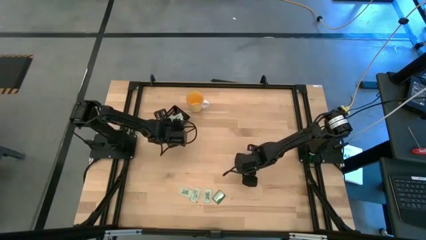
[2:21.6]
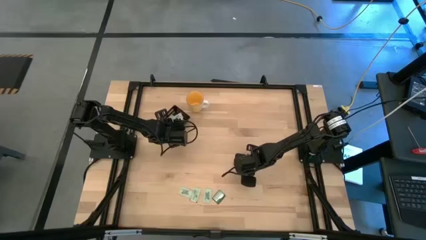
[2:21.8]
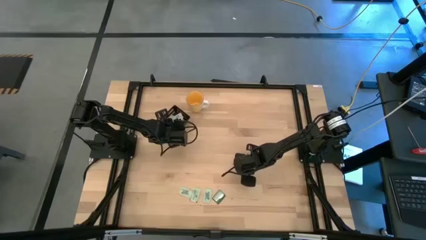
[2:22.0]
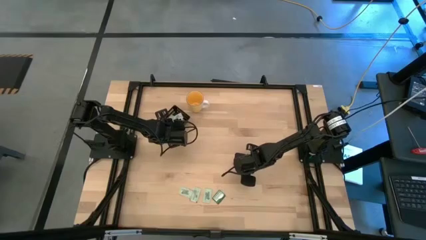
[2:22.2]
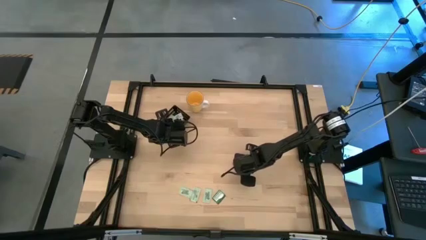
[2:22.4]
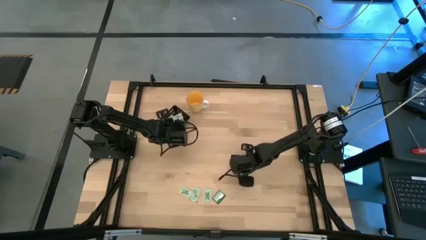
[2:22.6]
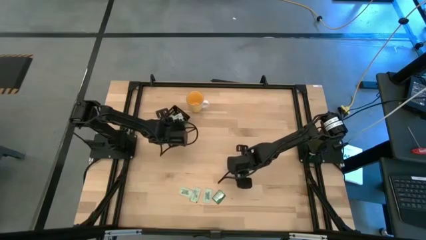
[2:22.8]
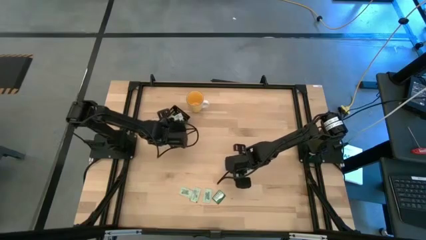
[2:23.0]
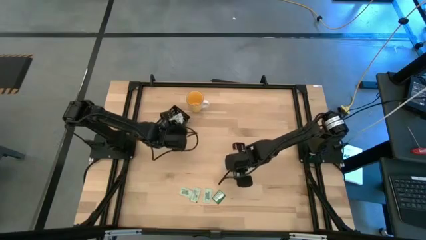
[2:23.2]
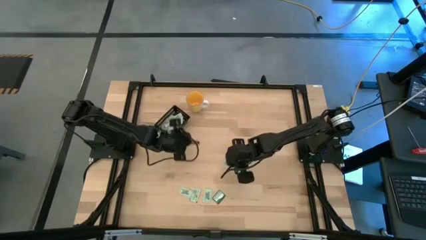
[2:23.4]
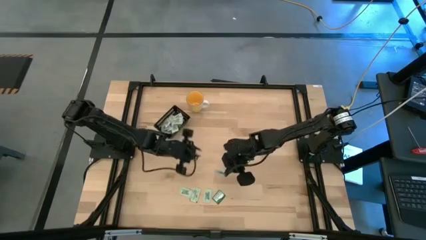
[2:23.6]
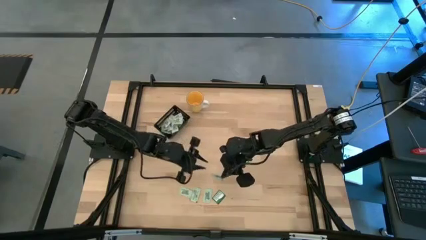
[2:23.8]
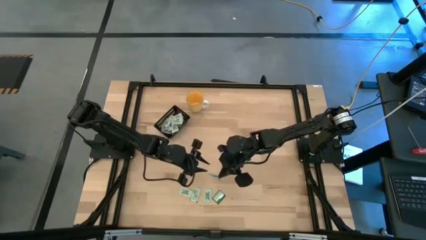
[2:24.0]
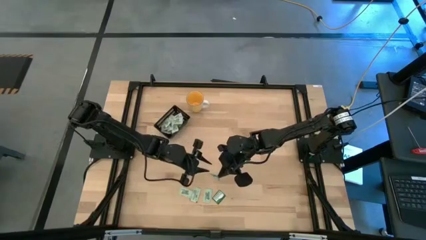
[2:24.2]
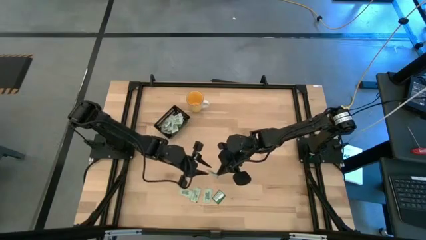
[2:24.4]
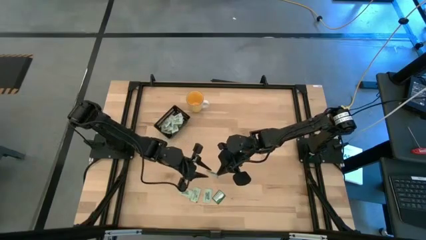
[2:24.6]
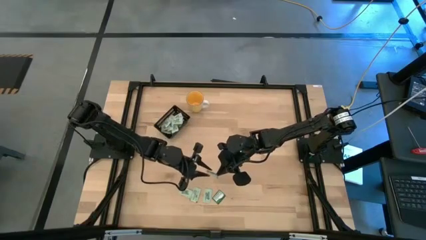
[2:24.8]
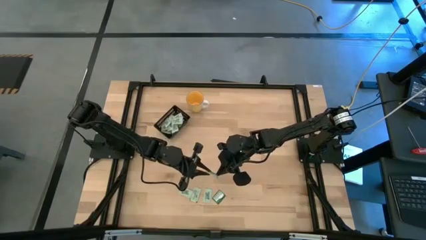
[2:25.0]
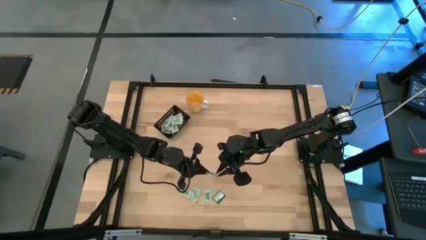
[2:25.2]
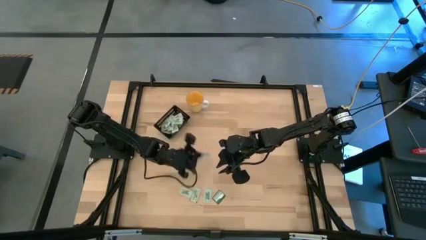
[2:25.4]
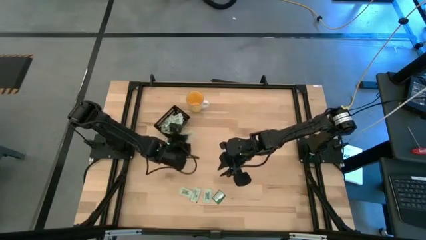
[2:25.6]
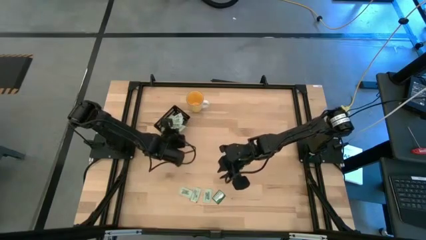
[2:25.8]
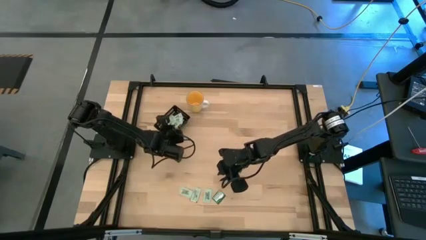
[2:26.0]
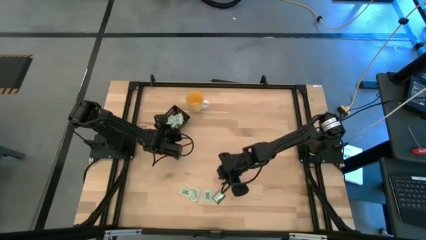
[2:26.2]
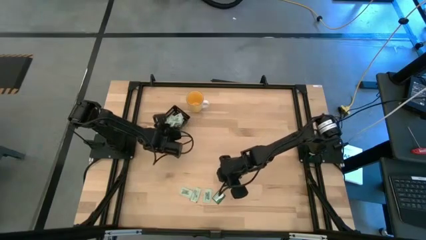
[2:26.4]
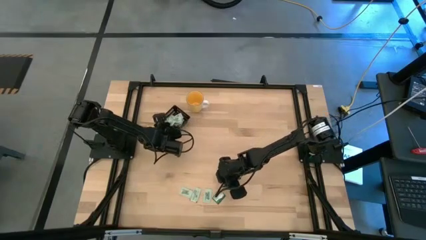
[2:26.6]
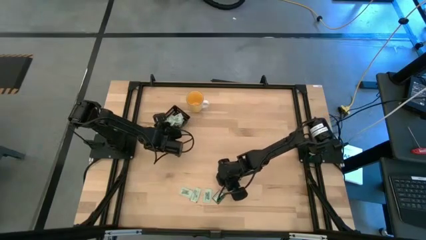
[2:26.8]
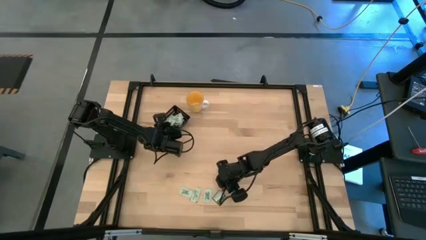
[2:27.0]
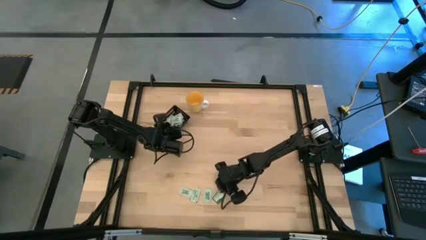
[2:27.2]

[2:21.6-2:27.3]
Task: Pick and place Stevia / Truvia into bins
Put the green stevia packet into the black bin

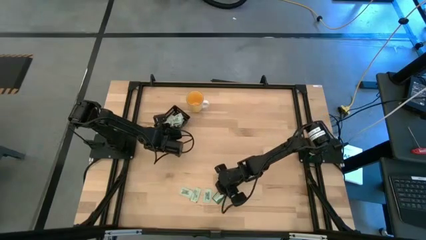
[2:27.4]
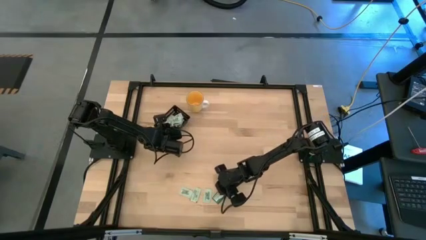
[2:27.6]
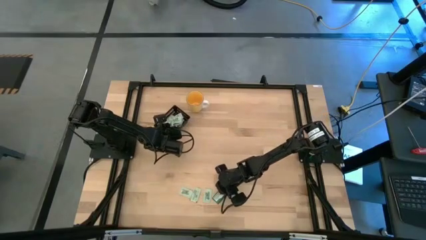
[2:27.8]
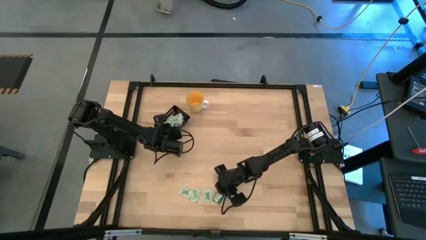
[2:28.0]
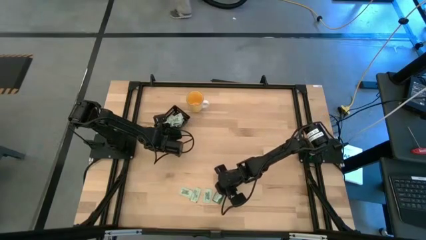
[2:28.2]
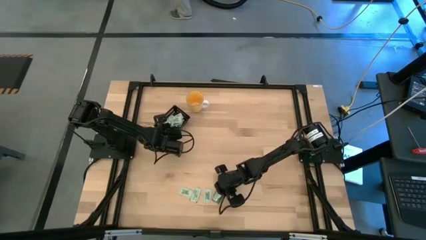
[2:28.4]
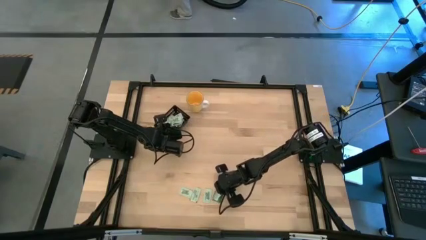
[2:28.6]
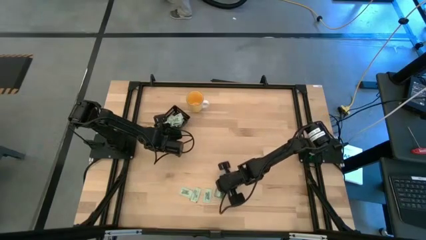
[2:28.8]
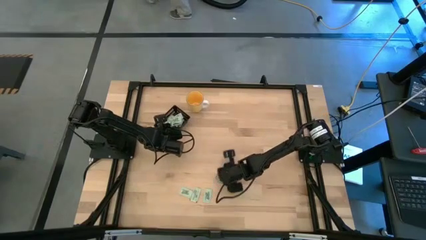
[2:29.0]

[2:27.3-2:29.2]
Put the green stevia packet into the black bin

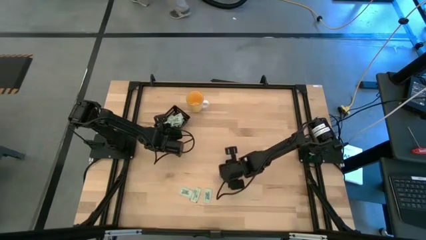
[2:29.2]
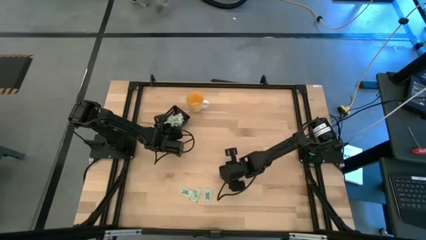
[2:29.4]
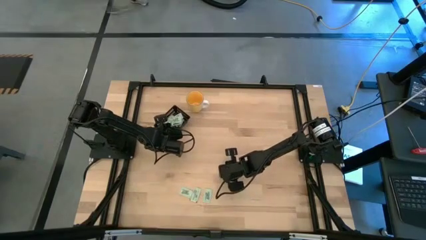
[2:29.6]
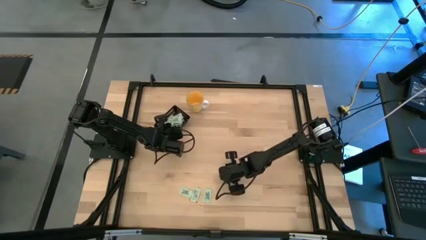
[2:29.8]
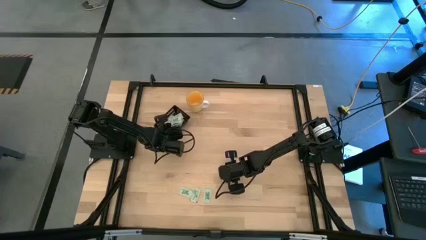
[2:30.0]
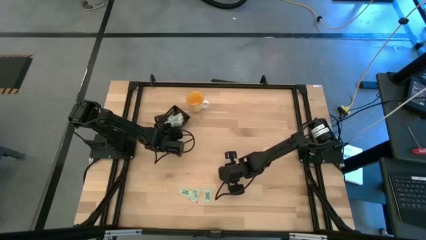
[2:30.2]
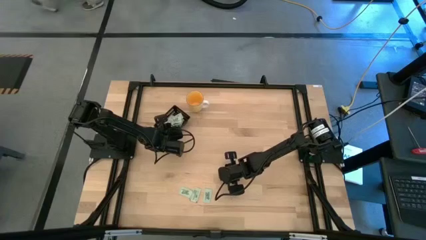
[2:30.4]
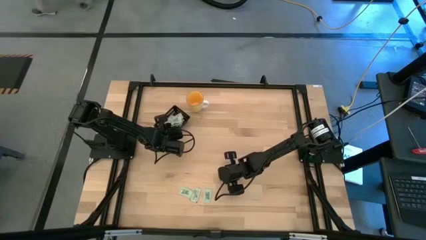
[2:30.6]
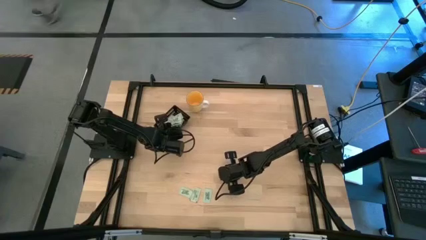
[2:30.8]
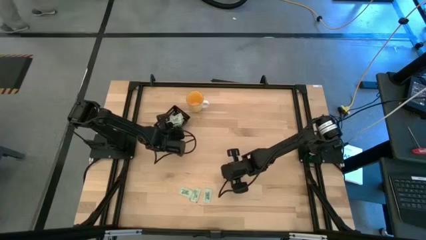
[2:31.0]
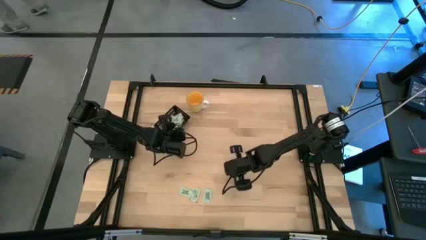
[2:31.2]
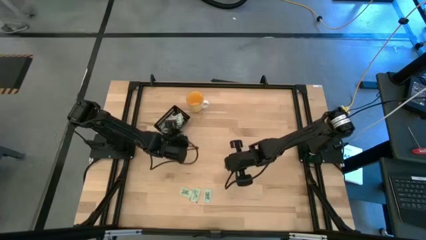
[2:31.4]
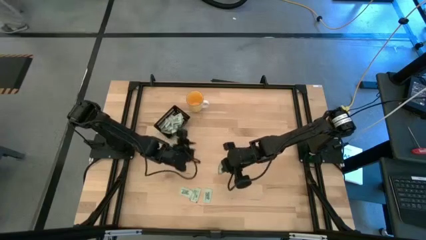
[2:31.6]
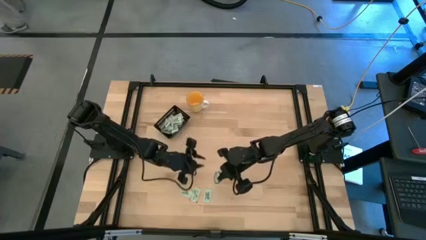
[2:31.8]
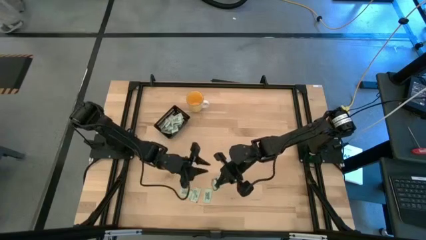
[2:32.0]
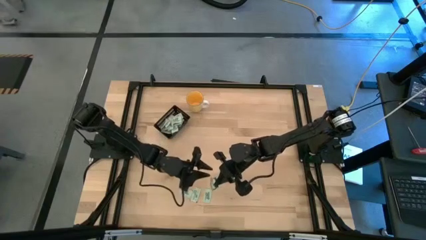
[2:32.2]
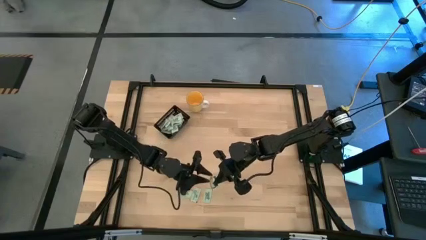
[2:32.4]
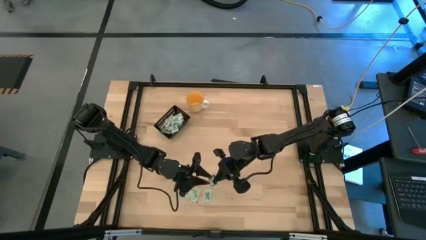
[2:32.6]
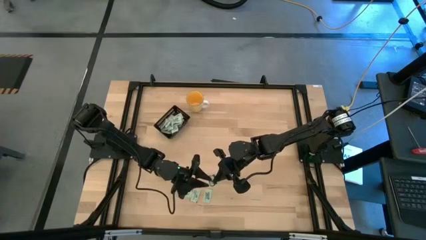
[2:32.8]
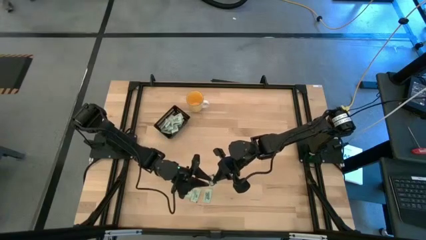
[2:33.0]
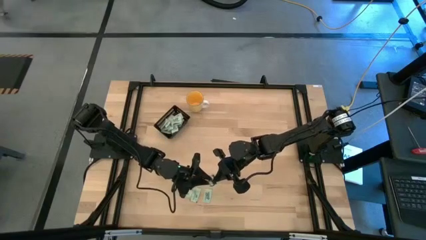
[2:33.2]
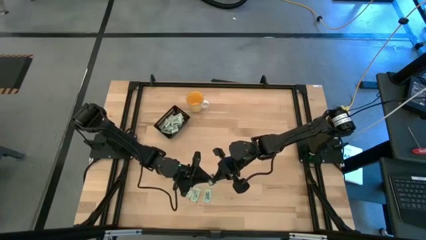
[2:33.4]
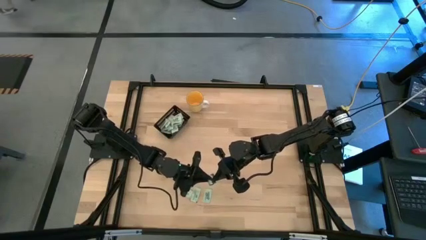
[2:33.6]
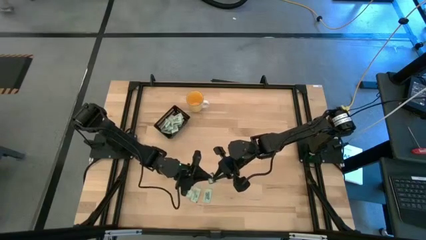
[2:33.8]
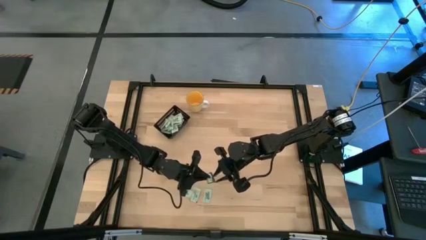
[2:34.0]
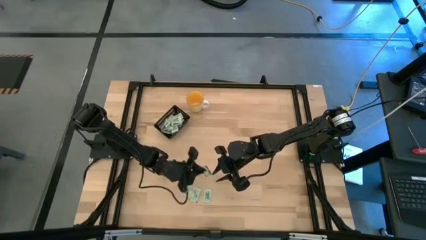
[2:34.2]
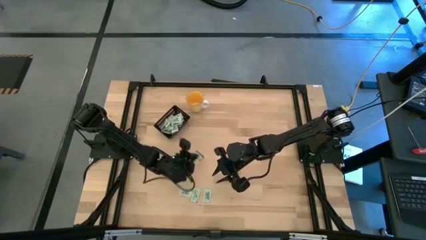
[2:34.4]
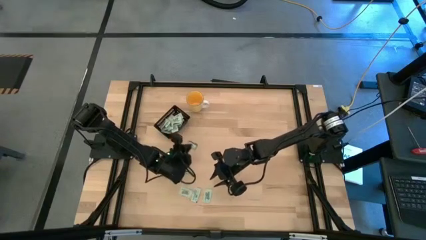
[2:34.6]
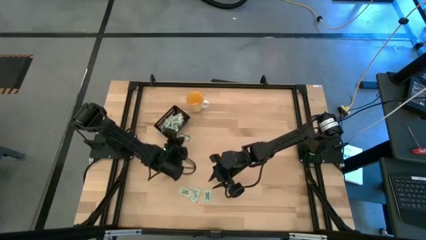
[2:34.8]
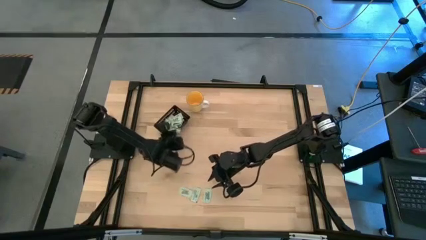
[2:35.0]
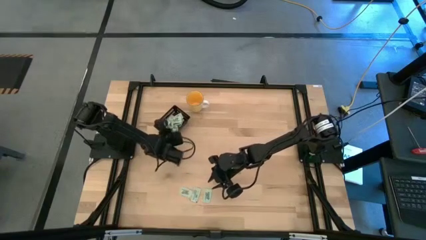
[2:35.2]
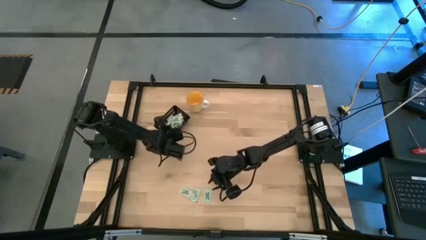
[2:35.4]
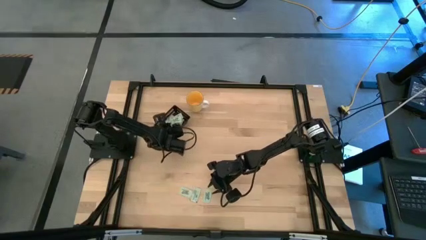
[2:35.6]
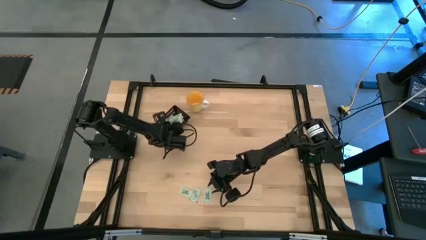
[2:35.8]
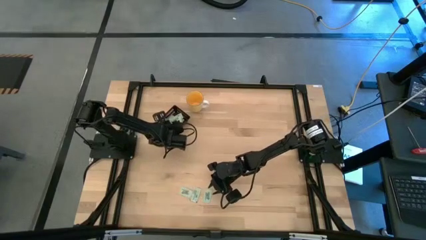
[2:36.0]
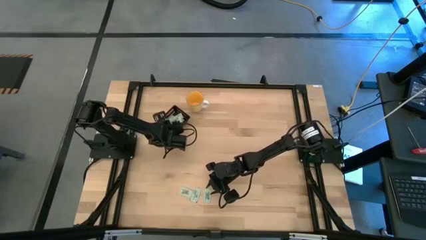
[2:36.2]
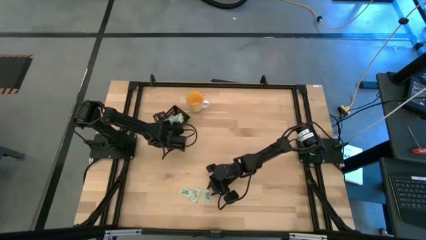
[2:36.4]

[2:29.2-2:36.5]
Put the green stevia packet into the black bin

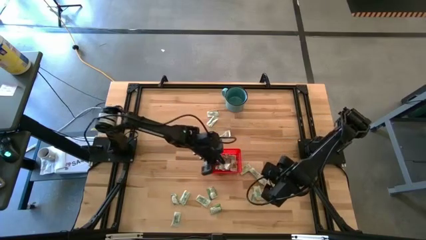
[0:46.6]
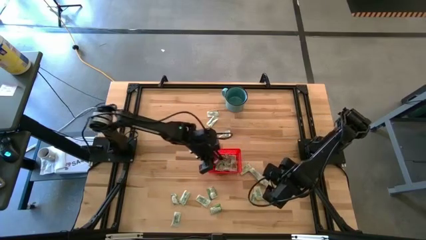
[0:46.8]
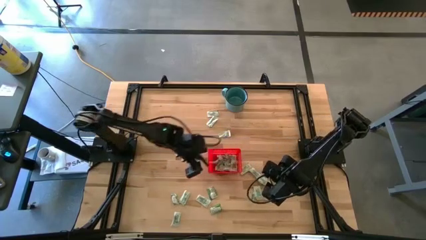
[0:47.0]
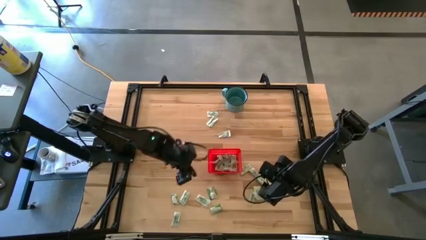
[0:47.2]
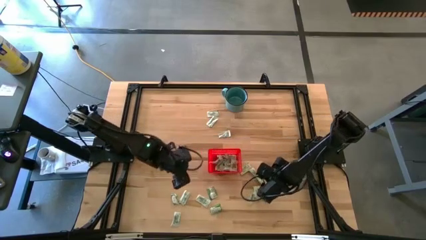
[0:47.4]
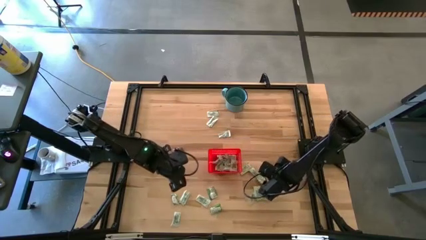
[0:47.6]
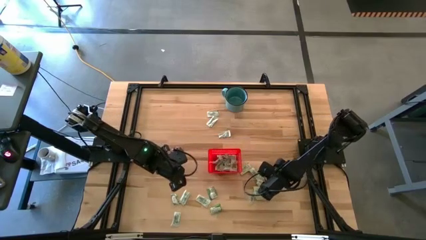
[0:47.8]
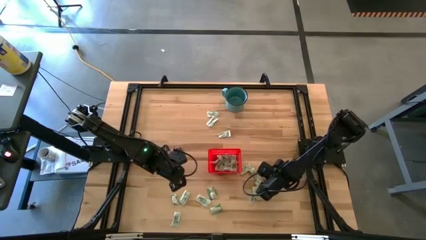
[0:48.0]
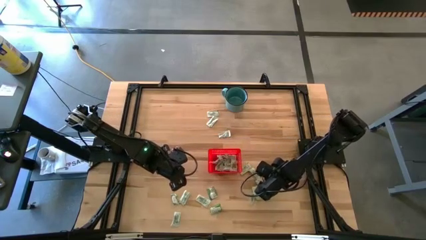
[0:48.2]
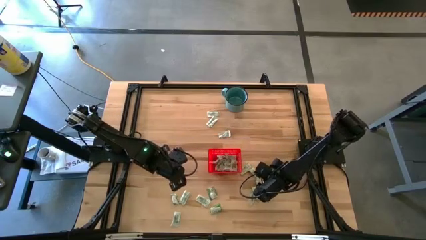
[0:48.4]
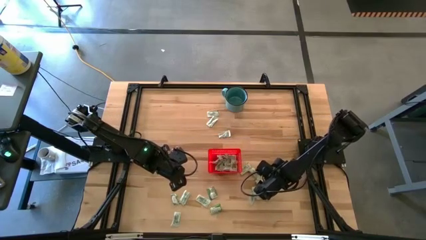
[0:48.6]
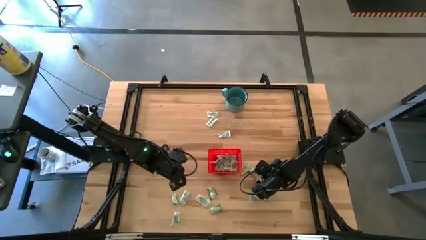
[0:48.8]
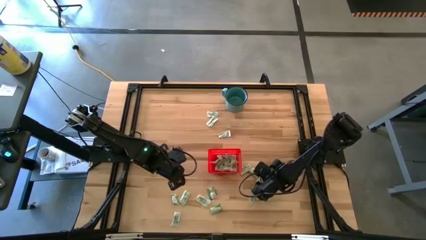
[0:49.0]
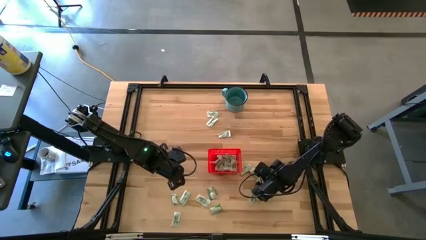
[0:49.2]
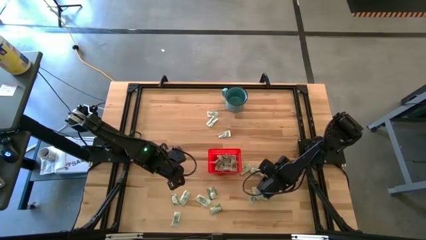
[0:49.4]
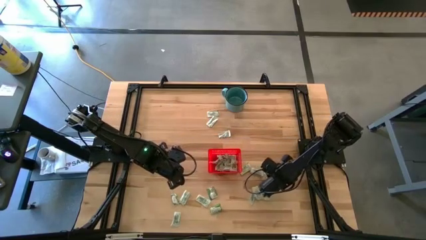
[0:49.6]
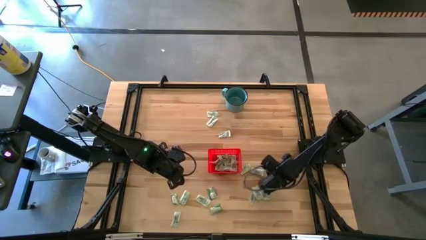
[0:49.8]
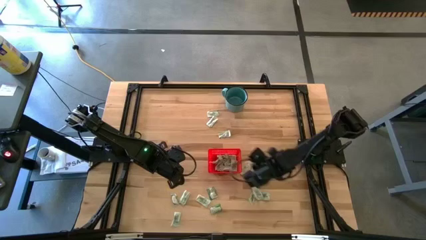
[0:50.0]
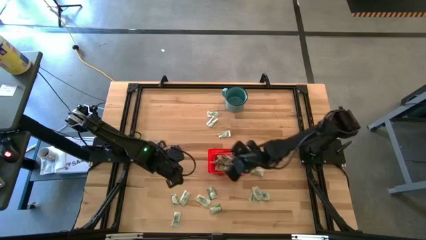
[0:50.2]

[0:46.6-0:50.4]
Task: Pick and place Stevia / Truvia into bins
Put the green stevia packet into the red bin
